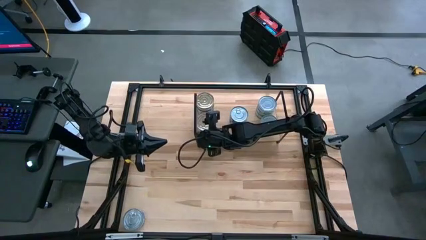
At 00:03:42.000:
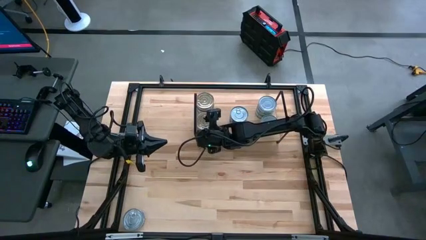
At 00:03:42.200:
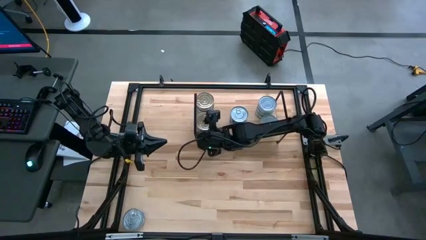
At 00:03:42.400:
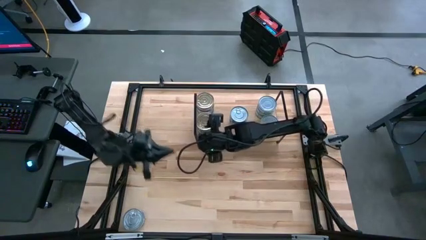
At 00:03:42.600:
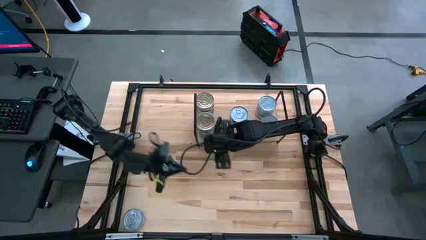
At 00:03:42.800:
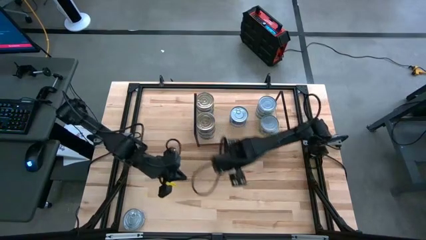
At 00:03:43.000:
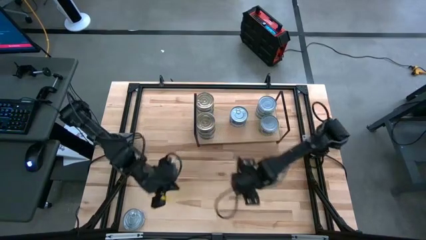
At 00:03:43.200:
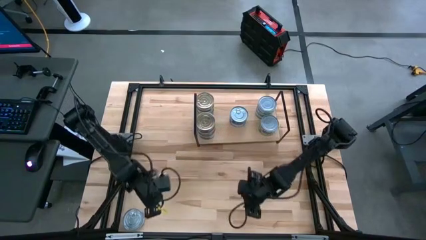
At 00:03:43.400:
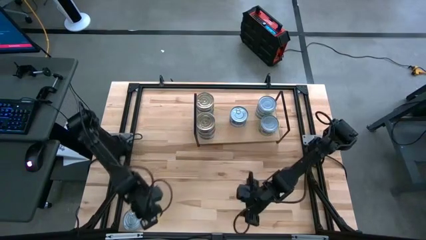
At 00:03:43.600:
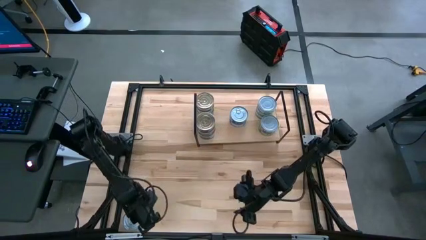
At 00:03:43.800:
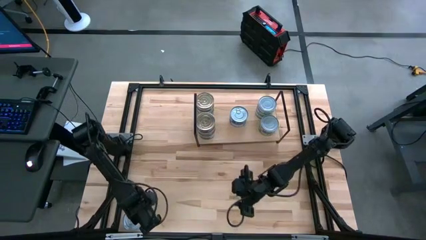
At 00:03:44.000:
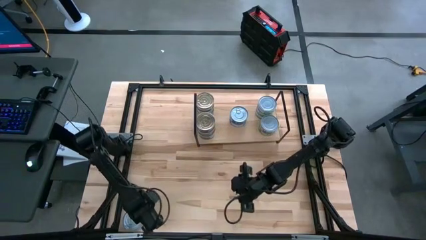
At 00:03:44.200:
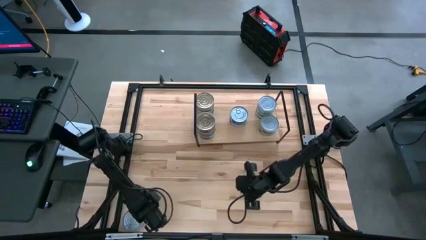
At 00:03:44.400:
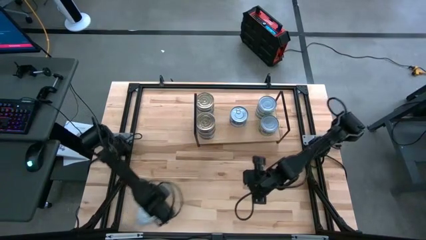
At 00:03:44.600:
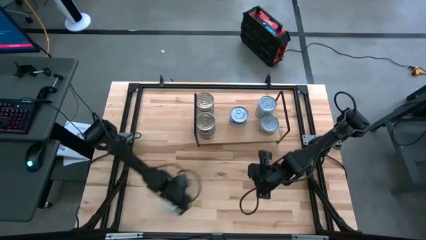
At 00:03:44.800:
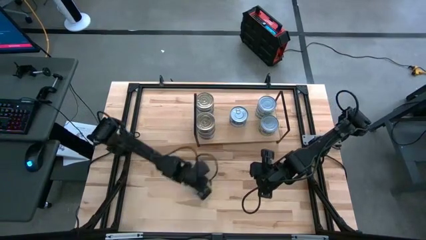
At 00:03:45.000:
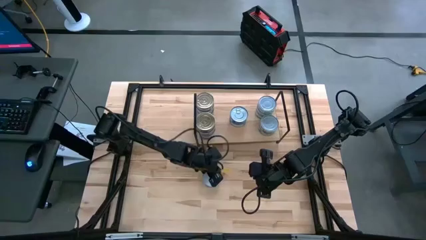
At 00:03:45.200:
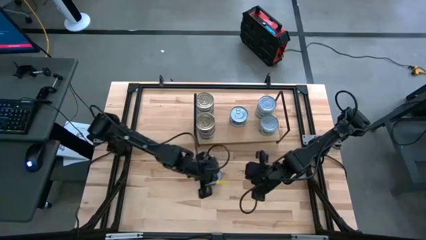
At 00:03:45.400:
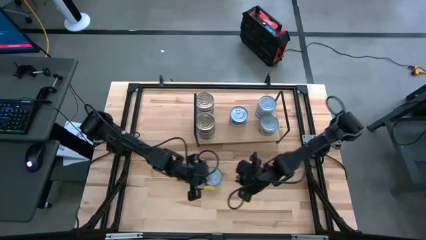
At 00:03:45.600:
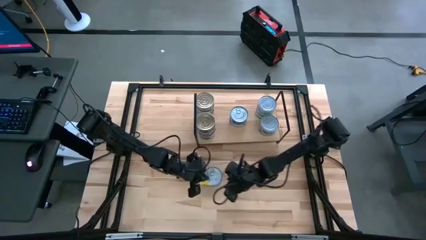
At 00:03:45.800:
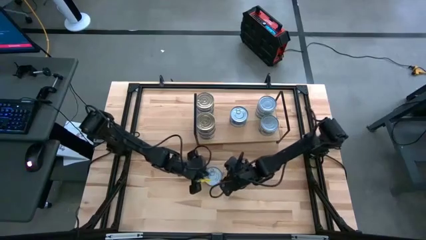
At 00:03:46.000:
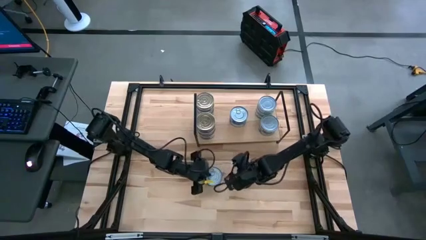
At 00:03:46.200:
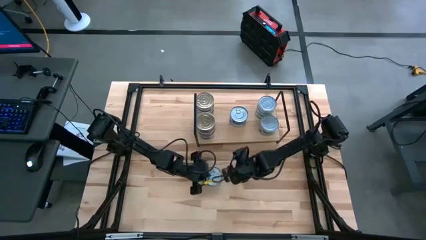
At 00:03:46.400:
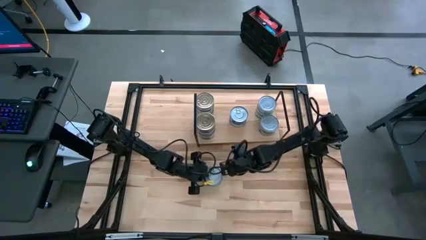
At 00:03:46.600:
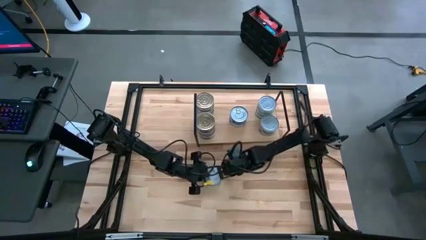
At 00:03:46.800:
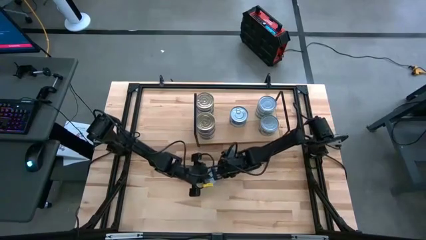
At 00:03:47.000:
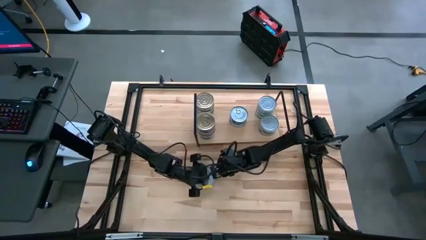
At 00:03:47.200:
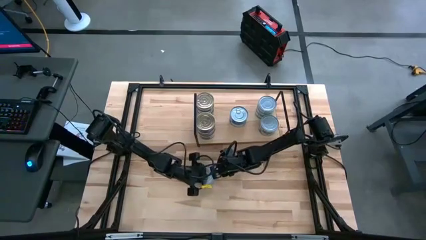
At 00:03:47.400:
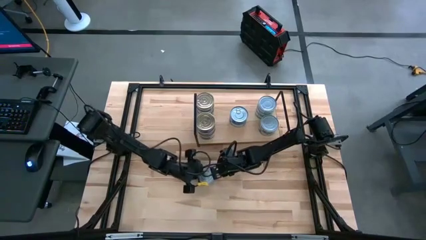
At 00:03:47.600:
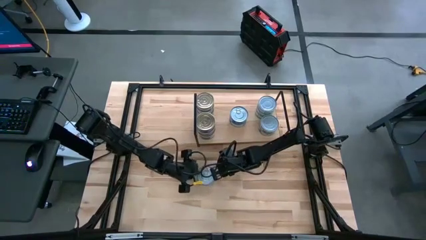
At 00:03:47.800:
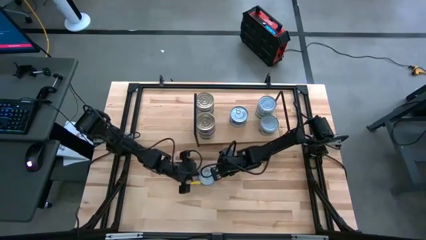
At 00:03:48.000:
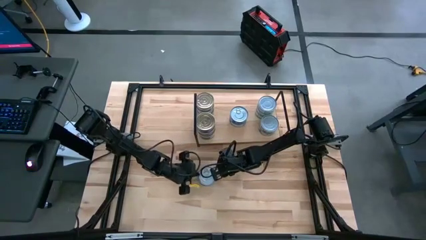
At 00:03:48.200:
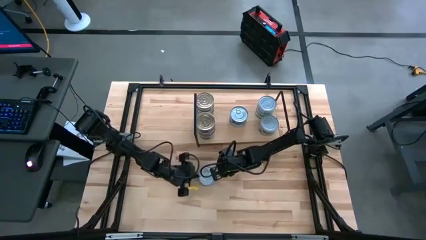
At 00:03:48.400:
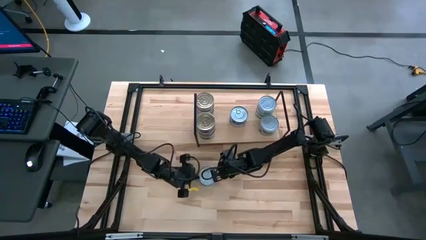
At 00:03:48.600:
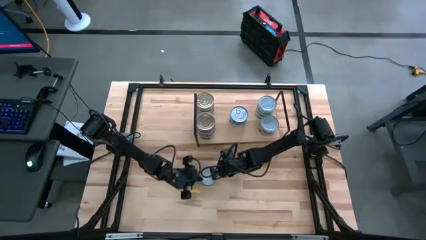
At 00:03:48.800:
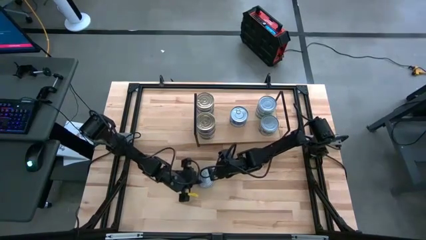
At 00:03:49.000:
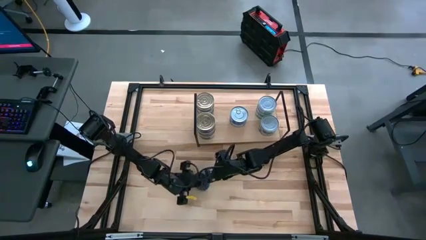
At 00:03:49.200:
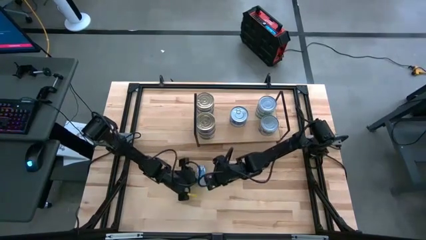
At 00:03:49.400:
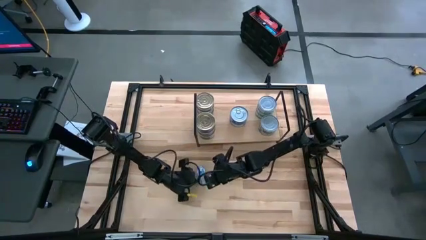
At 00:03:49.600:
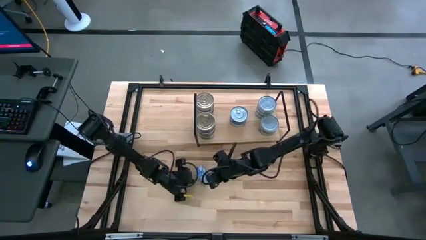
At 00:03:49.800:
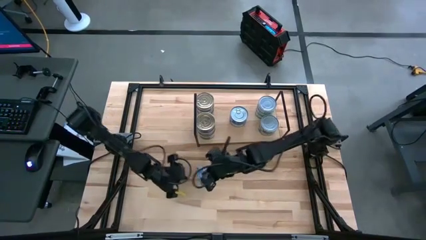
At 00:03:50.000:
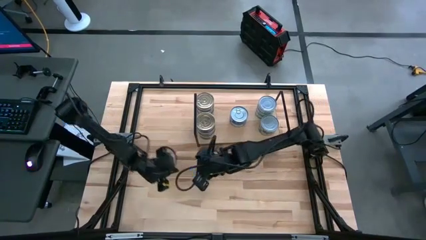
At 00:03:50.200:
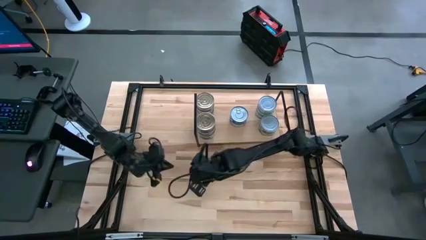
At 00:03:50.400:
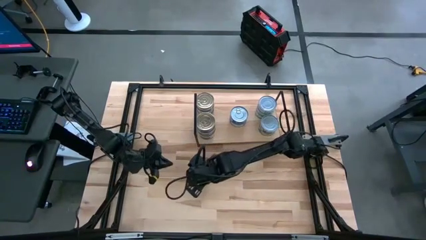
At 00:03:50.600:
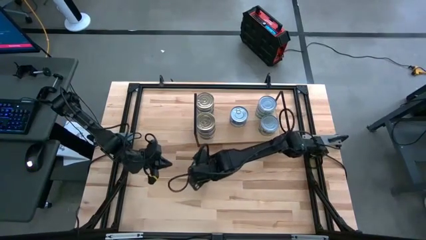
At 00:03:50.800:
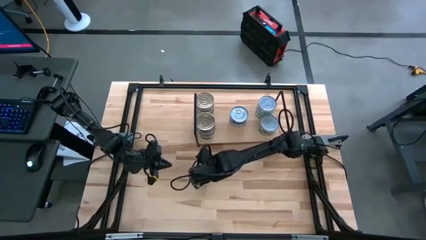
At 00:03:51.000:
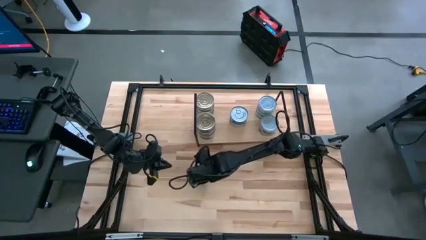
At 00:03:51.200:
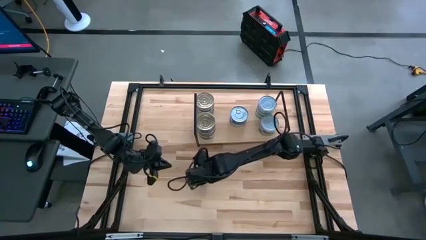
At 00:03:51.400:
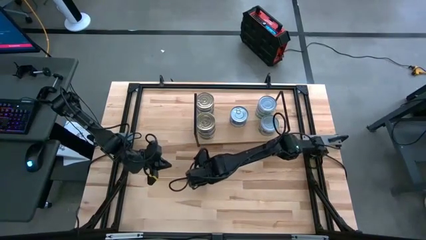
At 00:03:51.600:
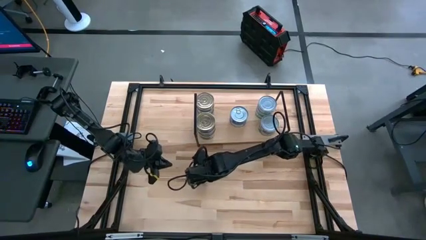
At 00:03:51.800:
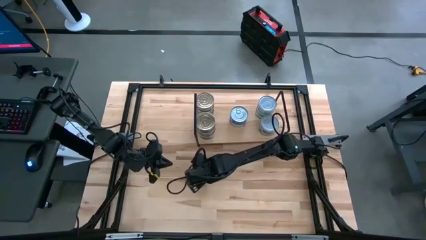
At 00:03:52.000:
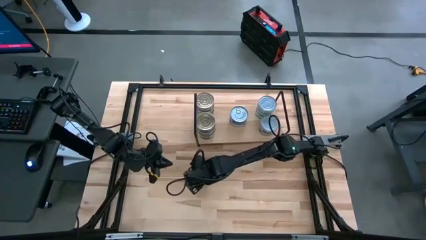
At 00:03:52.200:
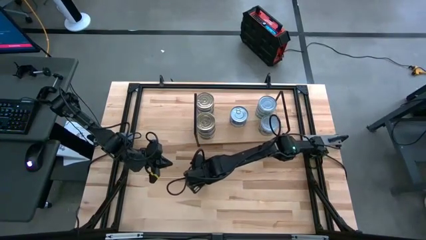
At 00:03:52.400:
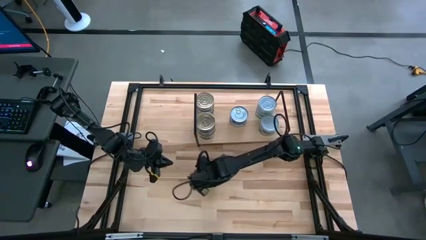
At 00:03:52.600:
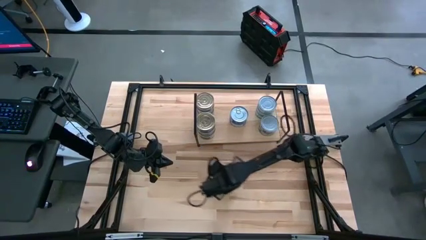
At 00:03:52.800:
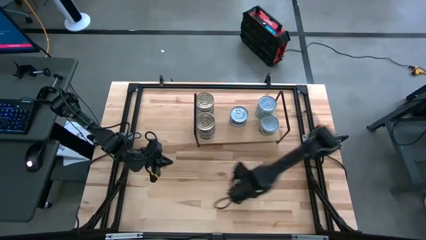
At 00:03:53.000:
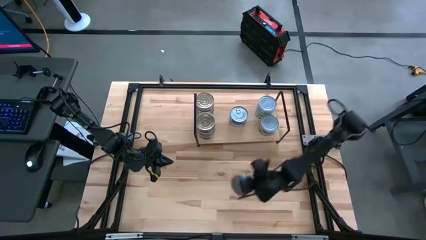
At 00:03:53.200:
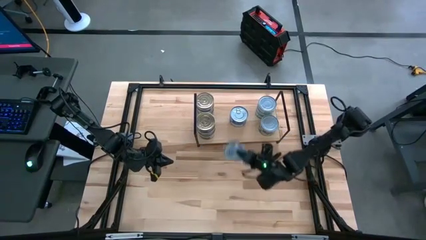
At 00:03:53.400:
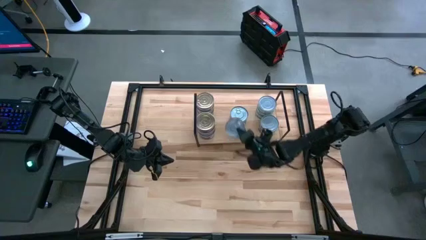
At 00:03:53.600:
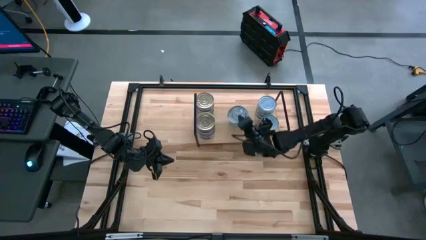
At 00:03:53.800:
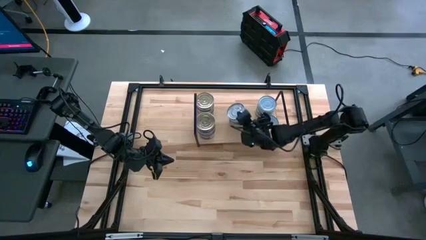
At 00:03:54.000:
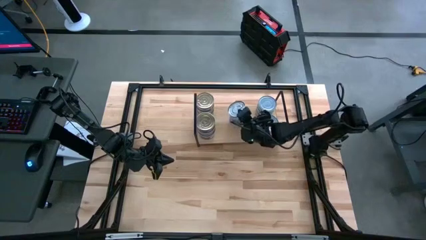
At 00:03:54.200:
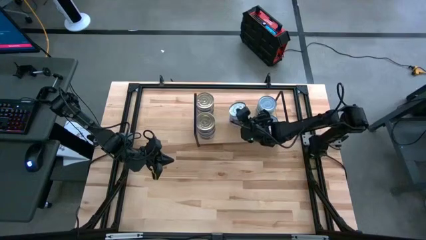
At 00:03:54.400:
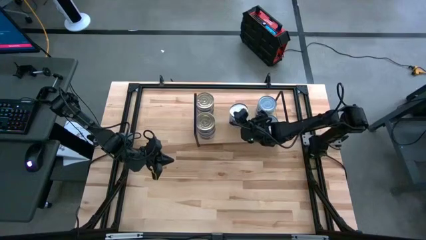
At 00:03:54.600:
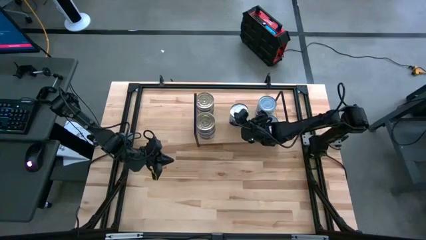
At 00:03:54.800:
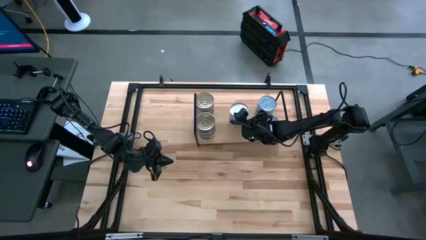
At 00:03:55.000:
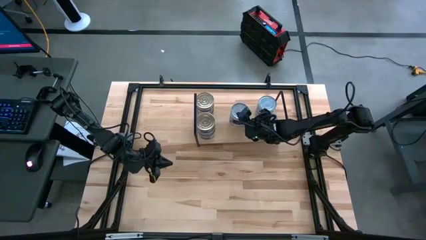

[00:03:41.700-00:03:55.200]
Task: Stack canned seafood by type on shelf
Stack the blue tuna can on top of the other blue tuna can on the shelf
